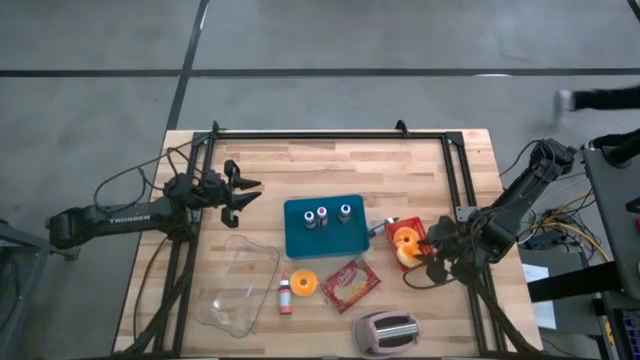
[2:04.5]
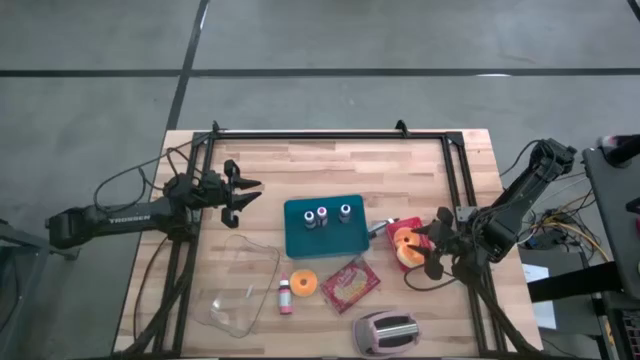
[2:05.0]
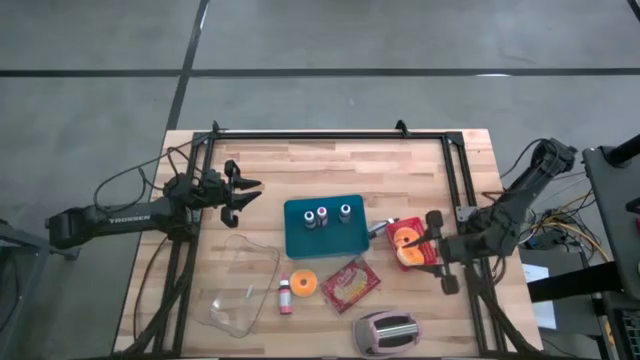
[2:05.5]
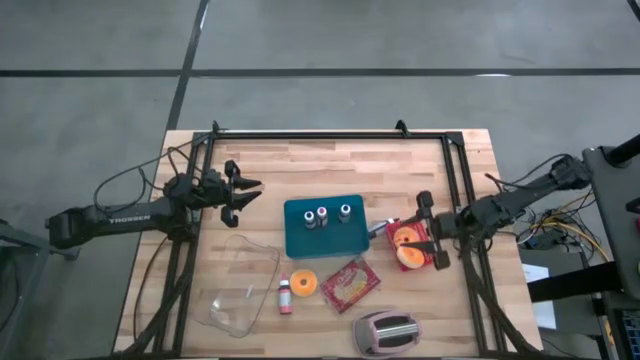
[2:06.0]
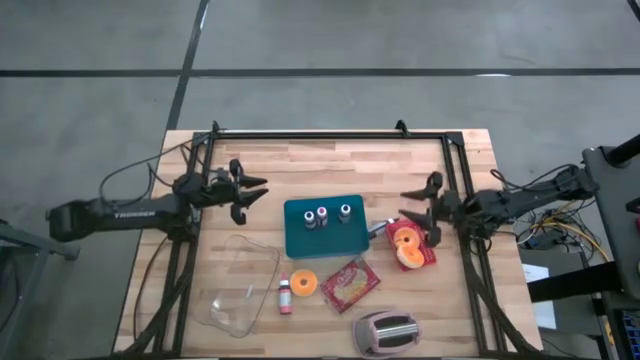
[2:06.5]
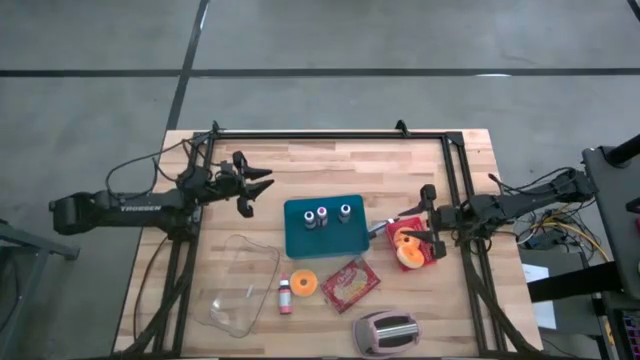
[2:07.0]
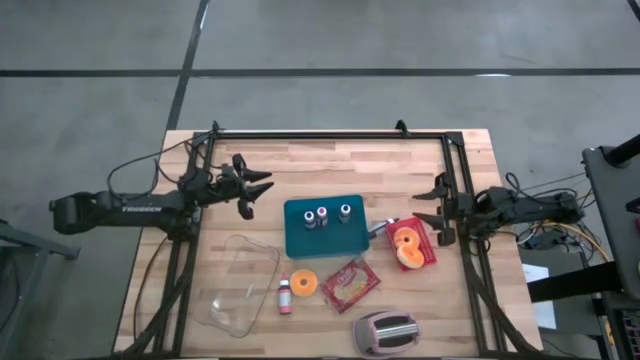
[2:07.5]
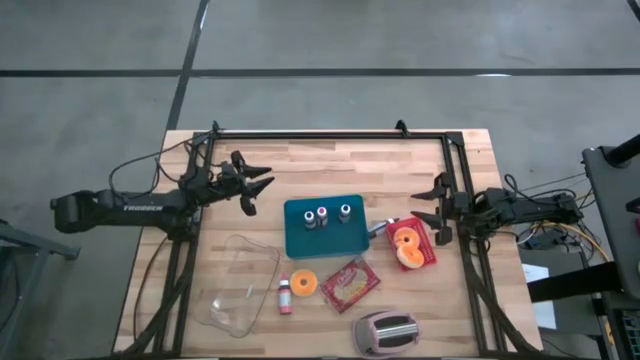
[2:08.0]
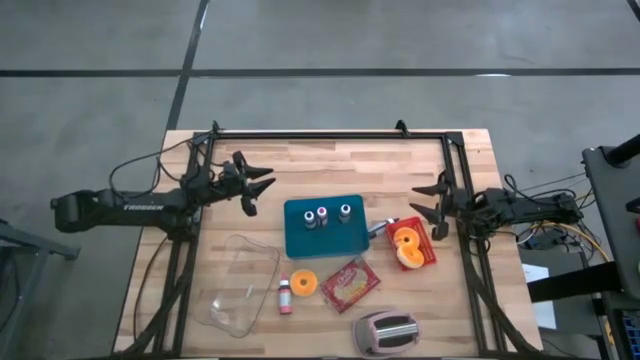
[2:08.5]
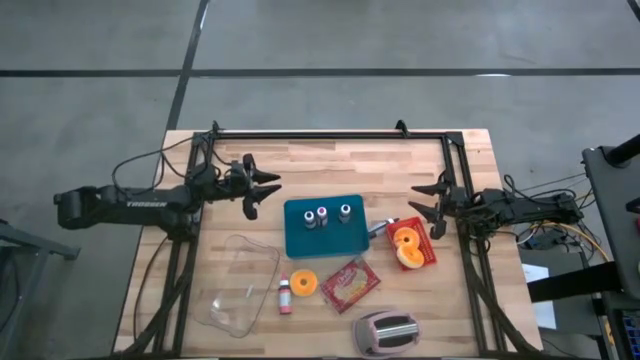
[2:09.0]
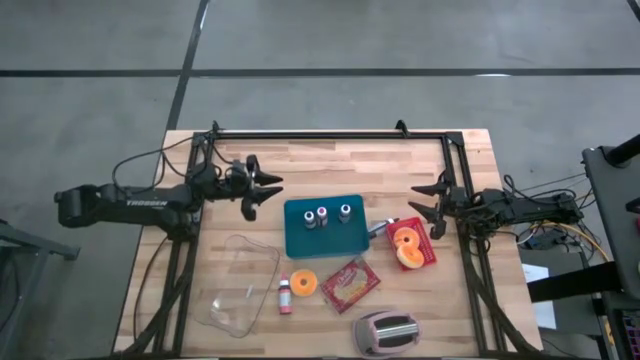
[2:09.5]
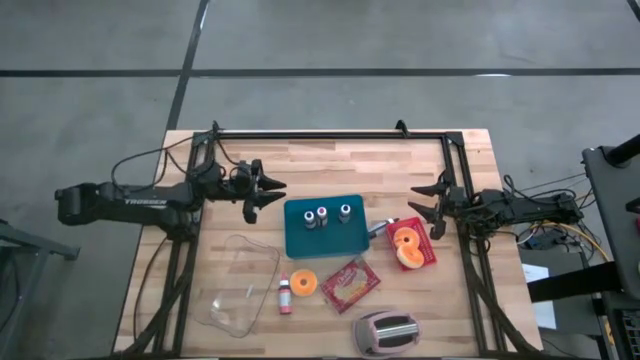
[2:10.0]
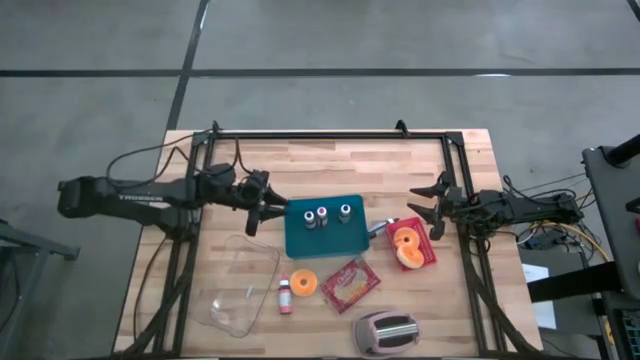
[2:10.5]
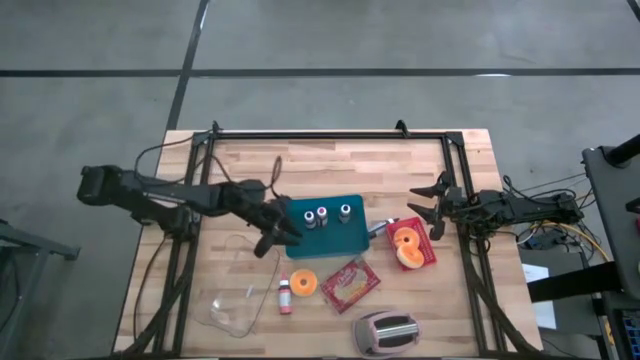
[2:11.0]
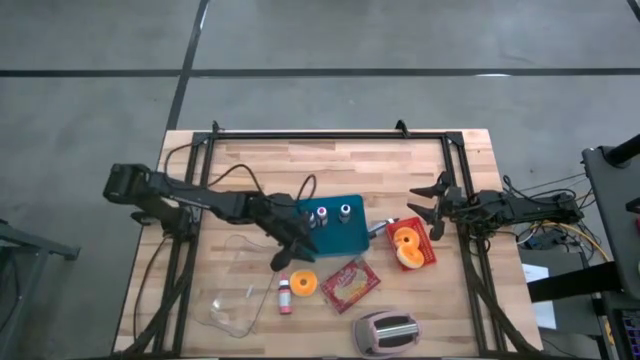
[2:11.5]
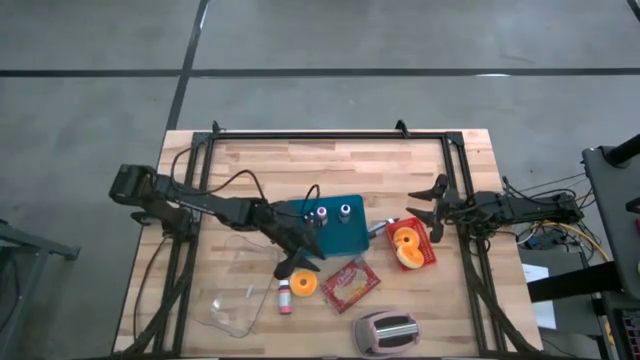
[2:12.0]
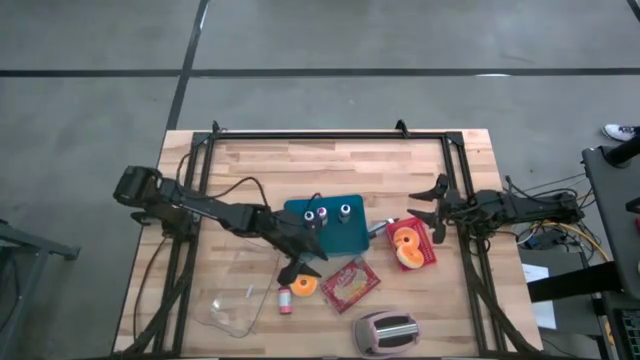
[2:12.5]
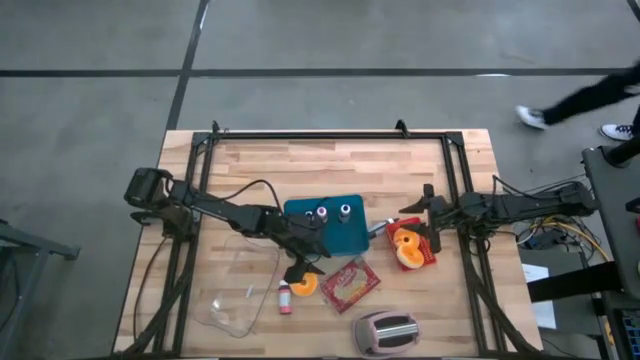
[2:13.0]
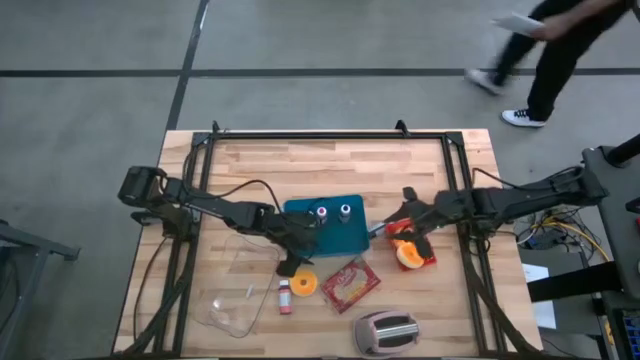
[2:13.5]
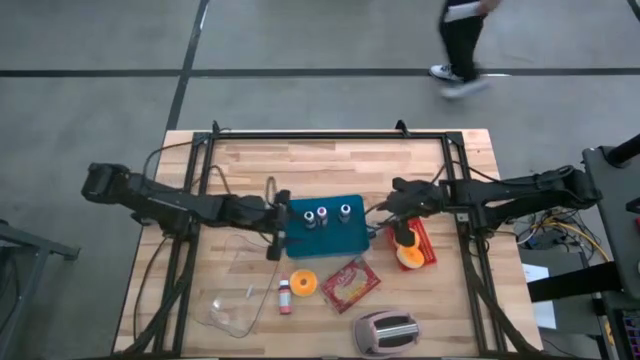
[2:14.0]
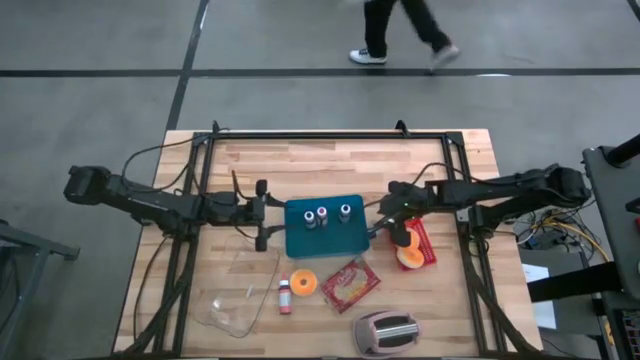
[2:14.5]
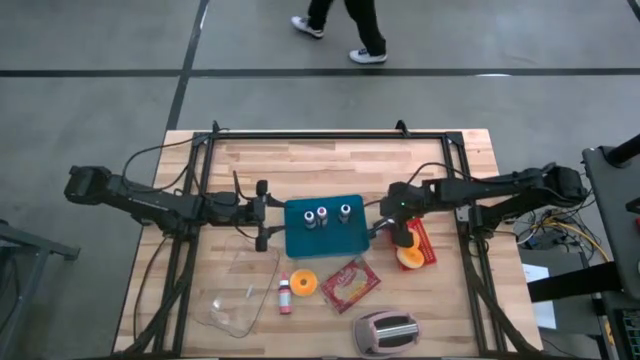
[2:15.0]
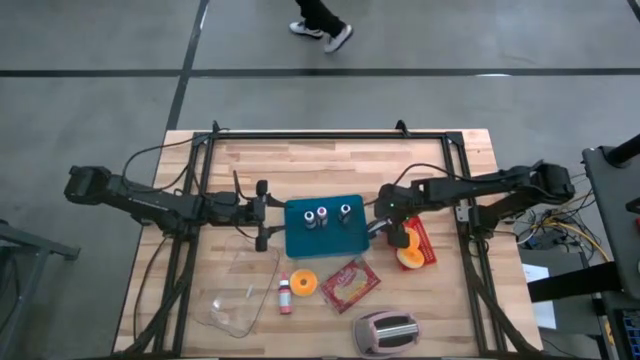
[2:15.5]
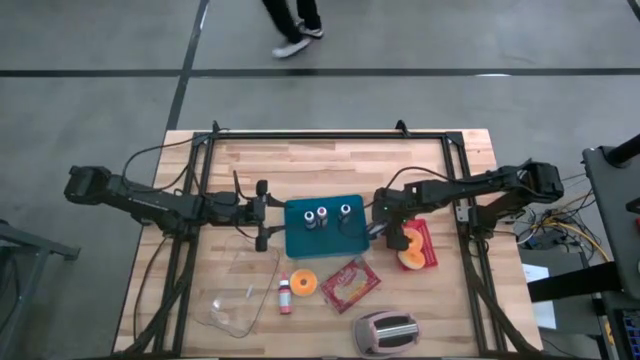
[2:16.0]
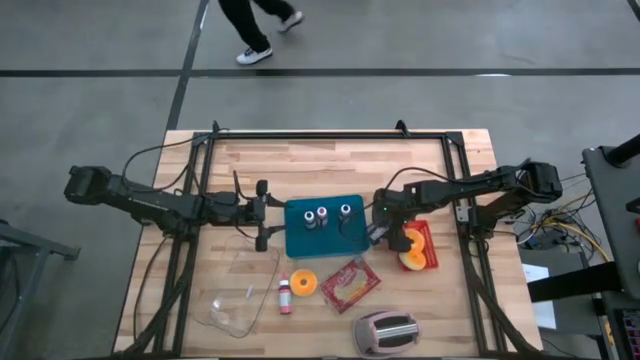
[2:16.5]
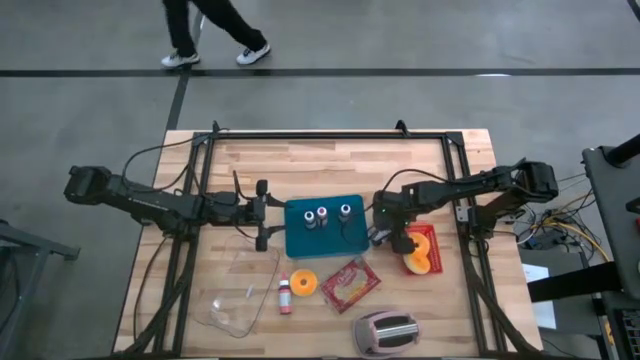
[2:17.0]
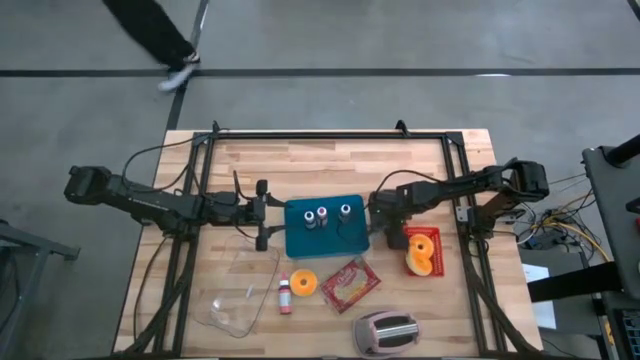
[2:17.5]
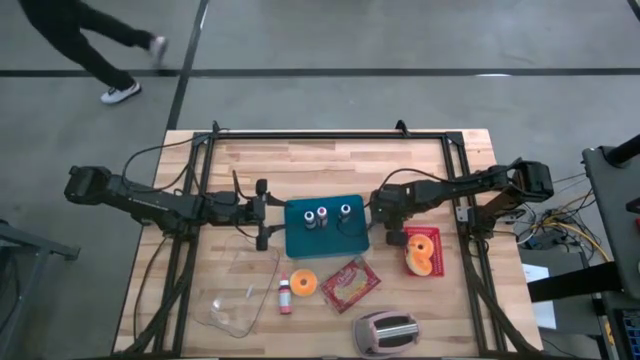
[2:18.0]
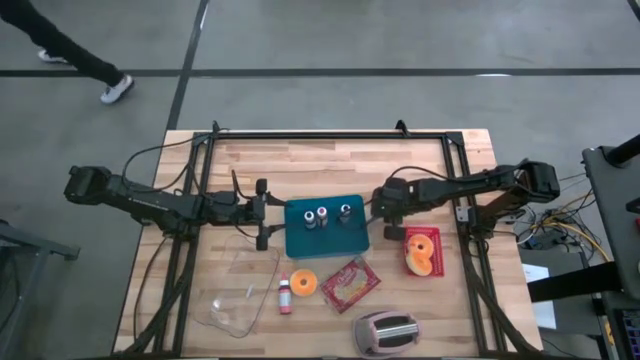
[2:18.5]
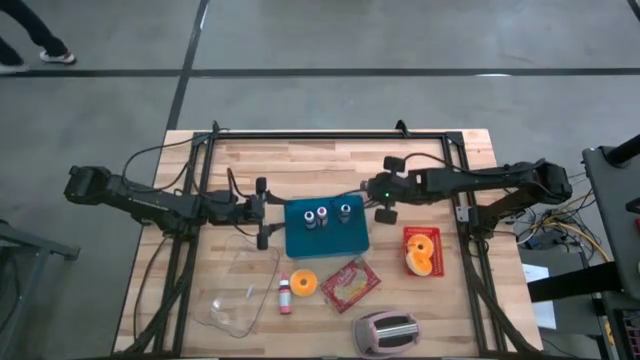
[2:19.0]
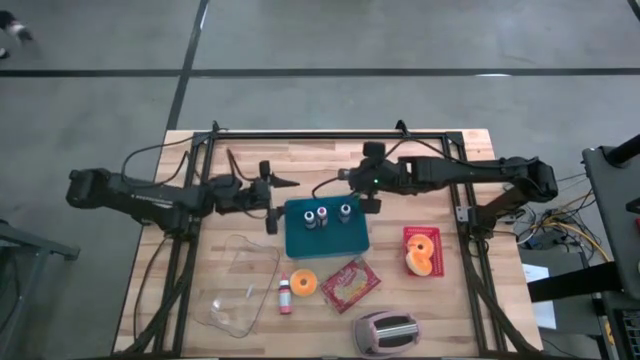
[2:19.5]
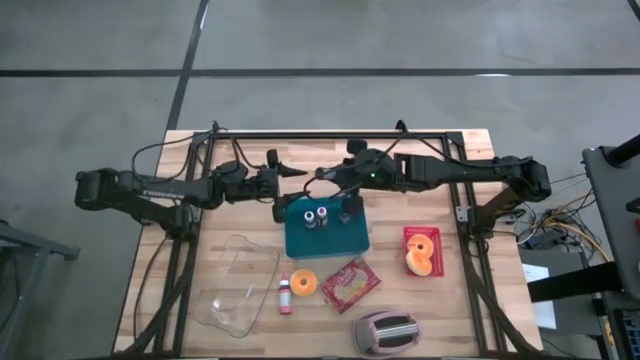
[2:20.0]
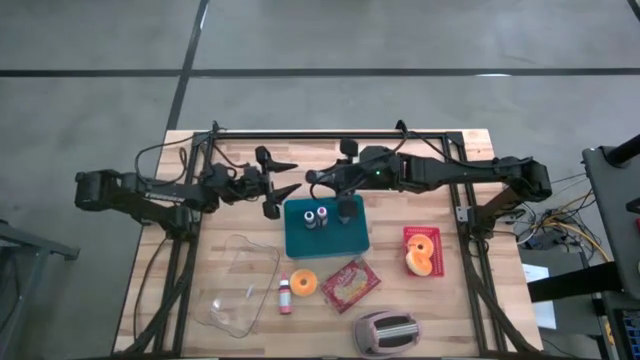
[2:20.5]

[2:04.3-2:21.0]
Task: Pick & Place Food Item
Put the black food coloring bottle into the blue bin

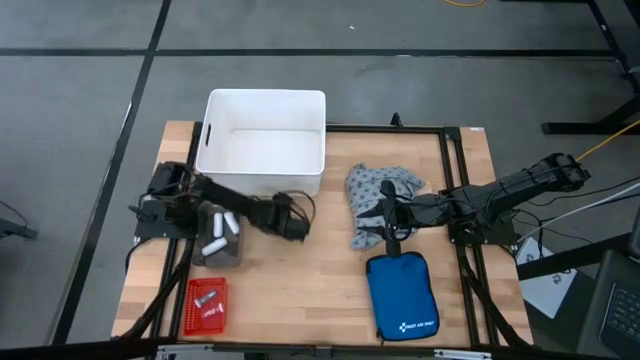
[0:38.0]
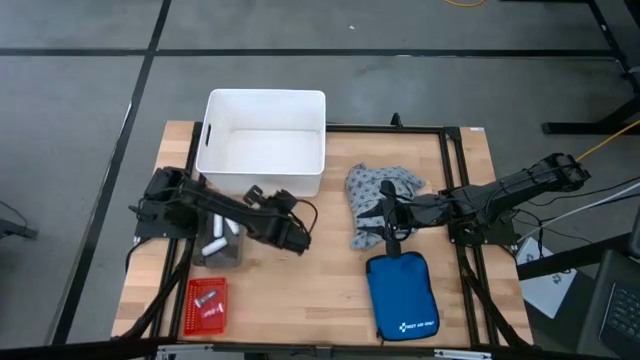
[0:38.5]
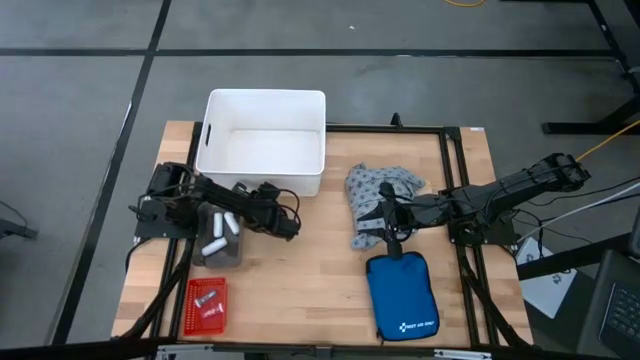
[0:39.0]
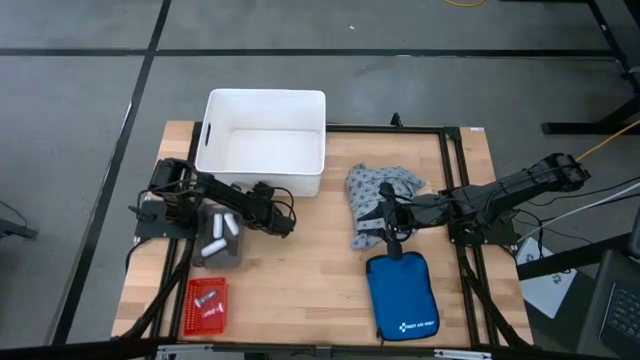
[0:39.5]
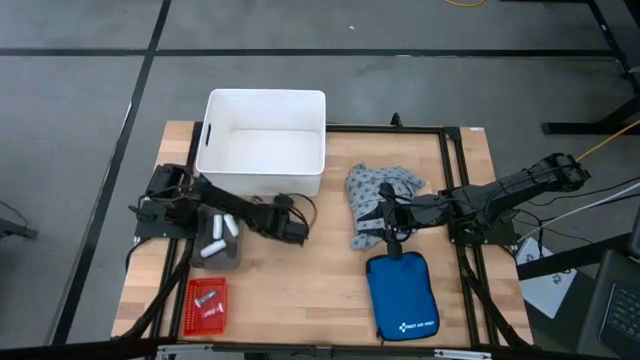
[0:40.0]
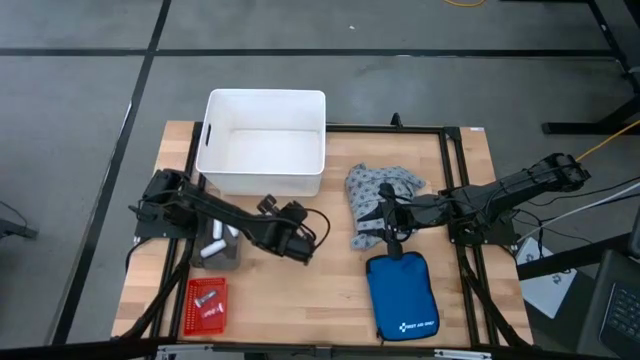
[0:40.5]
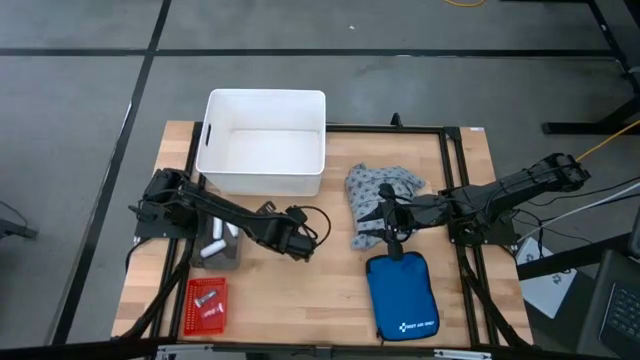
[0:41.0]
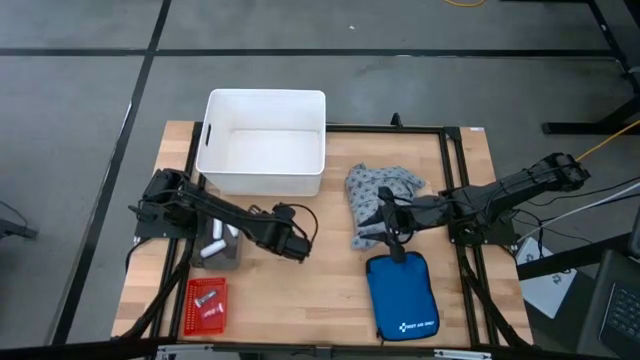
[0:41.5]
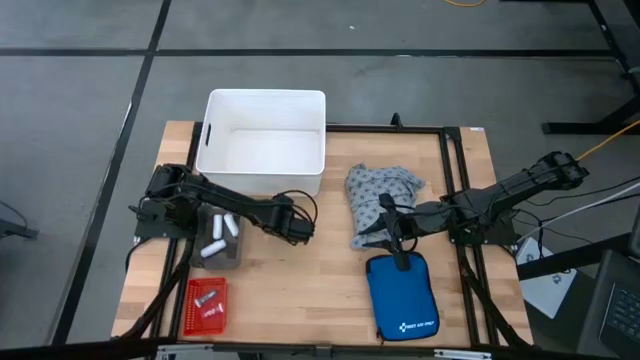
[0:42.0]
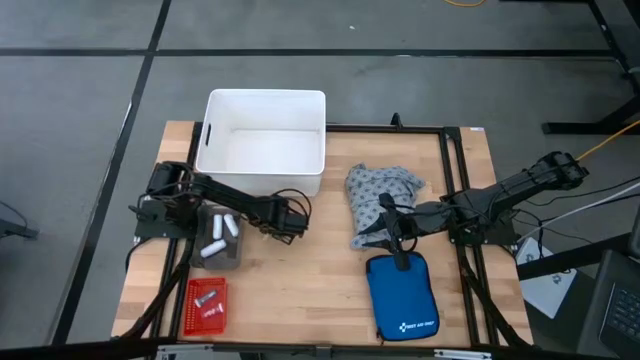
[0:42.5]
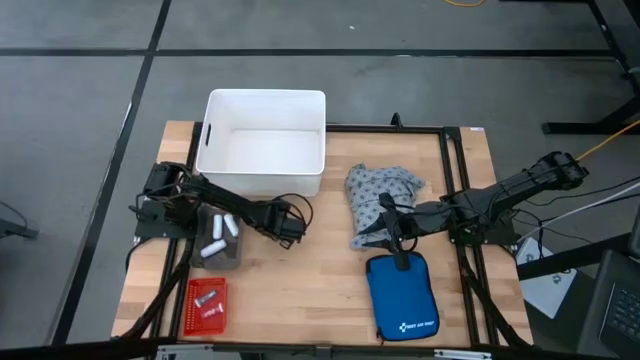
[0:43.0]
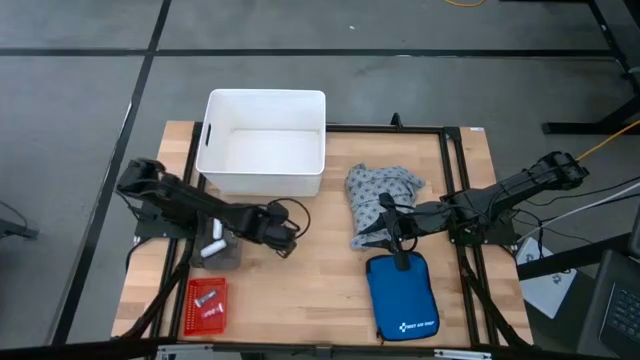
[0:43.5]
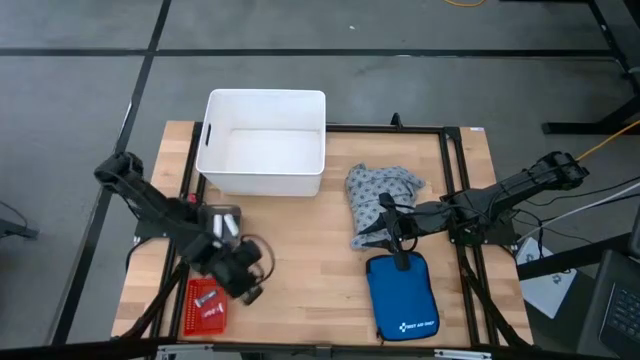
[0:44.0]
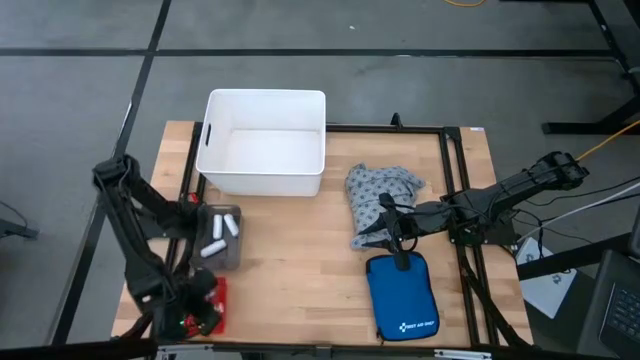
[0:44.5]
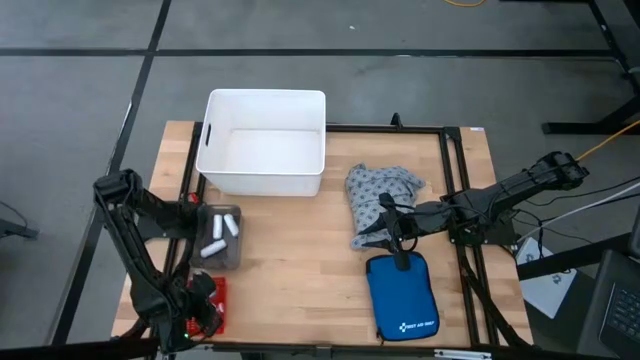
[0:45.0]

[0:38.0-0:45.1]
Task: Pick & place medical supplies in basket/bin
Put the yellow pill bottle into the red bin
